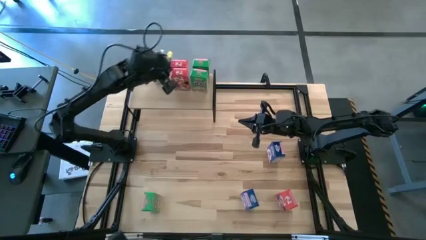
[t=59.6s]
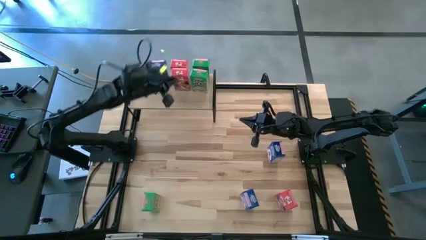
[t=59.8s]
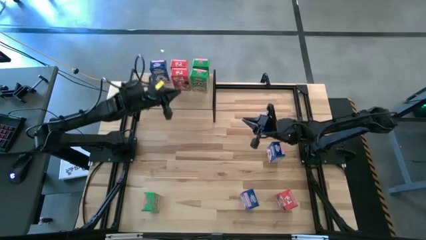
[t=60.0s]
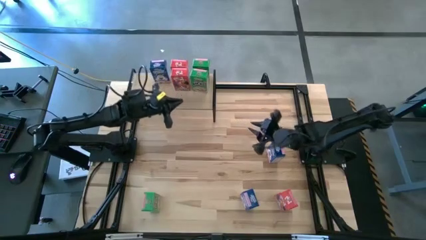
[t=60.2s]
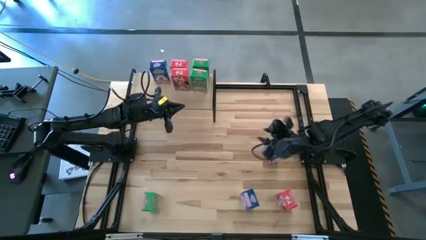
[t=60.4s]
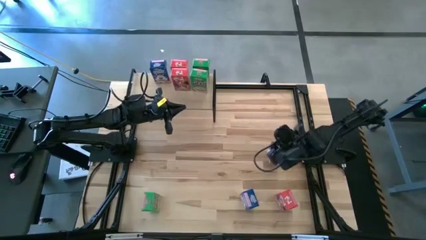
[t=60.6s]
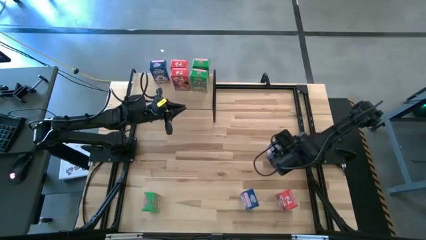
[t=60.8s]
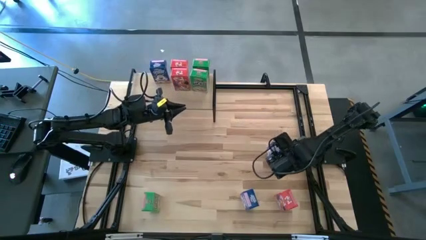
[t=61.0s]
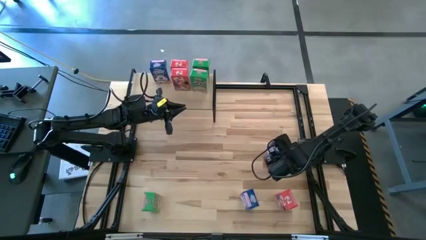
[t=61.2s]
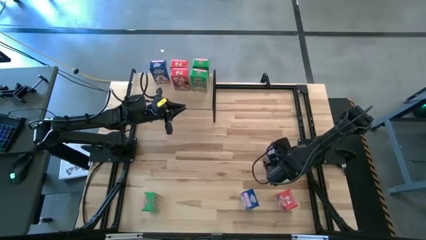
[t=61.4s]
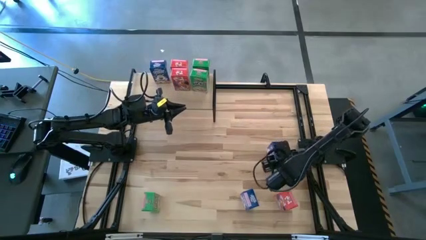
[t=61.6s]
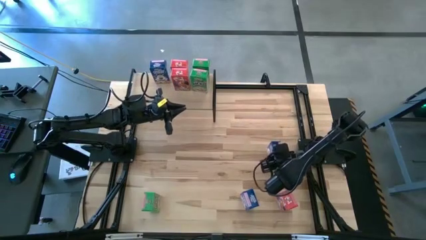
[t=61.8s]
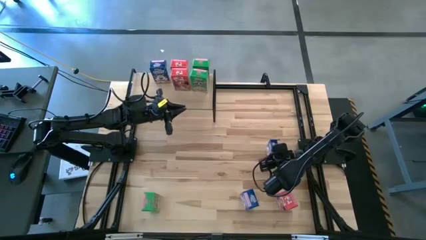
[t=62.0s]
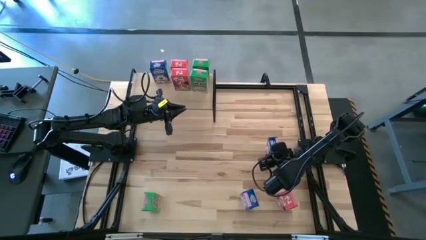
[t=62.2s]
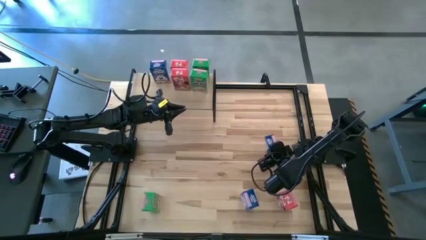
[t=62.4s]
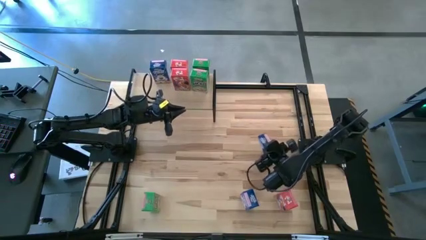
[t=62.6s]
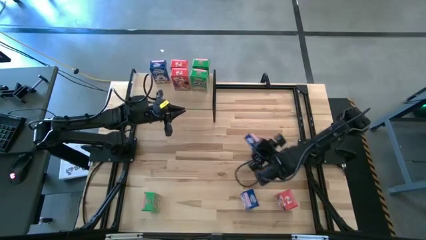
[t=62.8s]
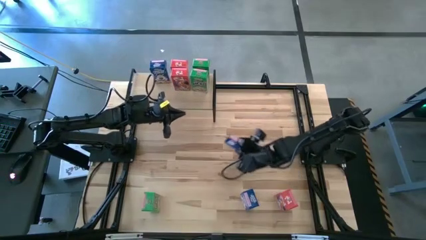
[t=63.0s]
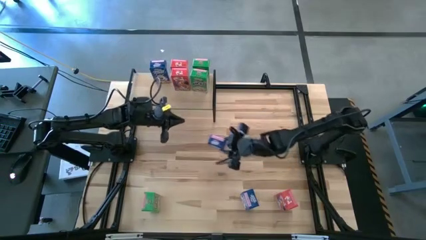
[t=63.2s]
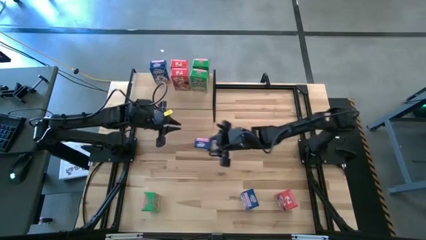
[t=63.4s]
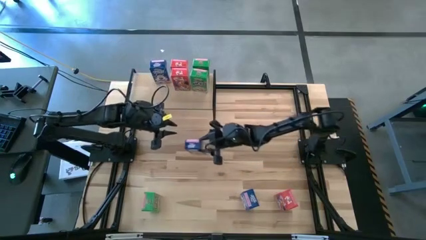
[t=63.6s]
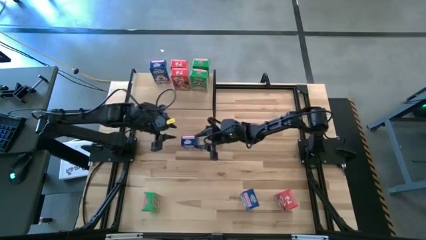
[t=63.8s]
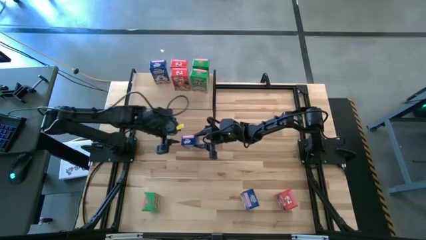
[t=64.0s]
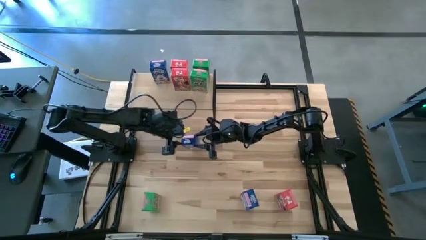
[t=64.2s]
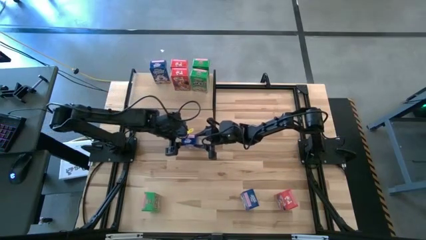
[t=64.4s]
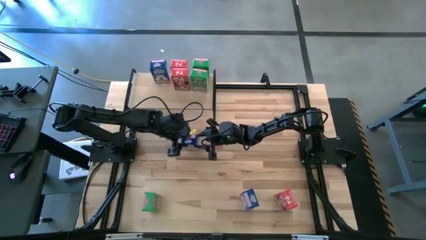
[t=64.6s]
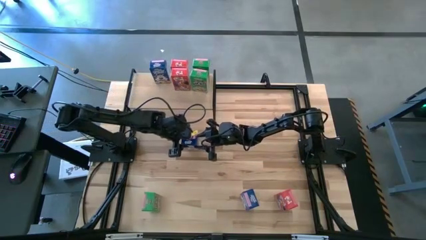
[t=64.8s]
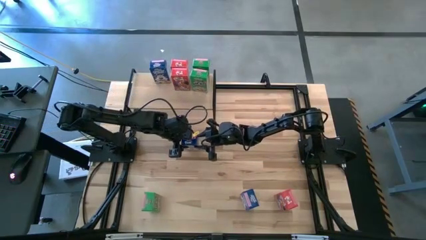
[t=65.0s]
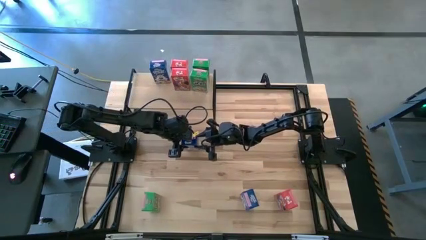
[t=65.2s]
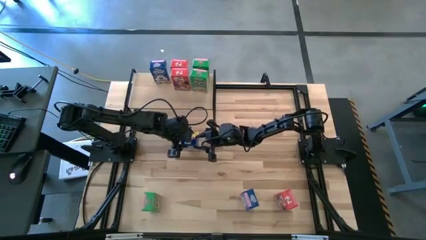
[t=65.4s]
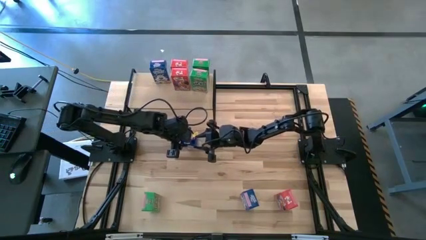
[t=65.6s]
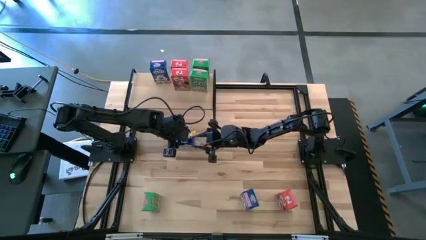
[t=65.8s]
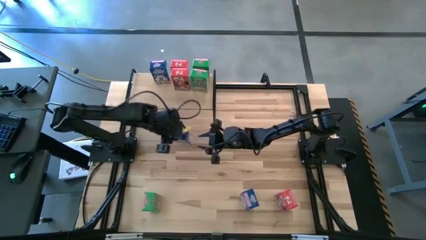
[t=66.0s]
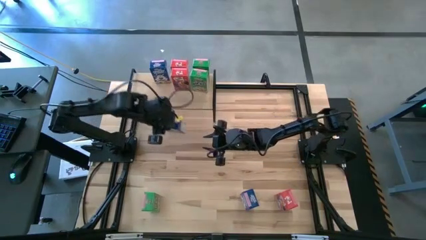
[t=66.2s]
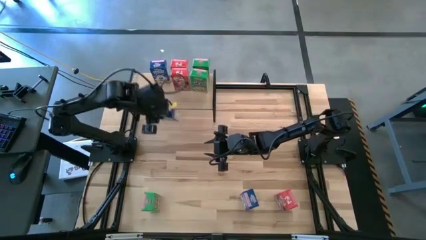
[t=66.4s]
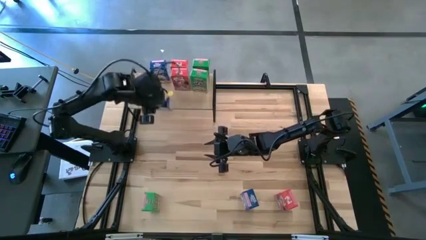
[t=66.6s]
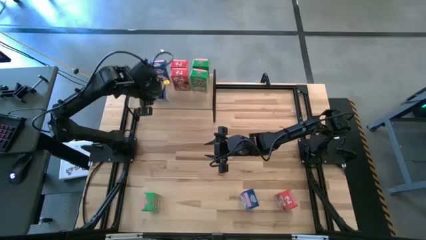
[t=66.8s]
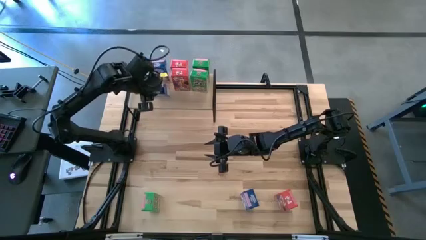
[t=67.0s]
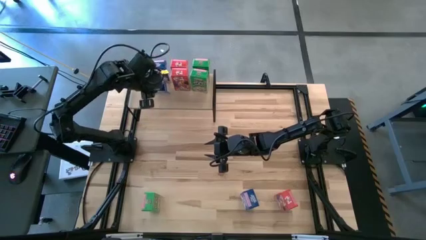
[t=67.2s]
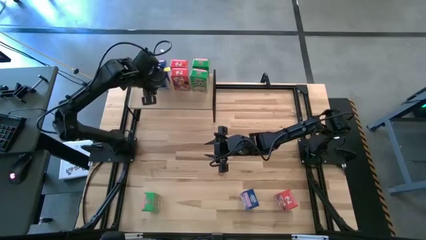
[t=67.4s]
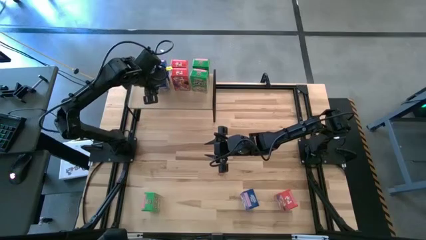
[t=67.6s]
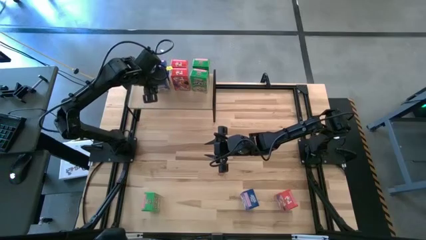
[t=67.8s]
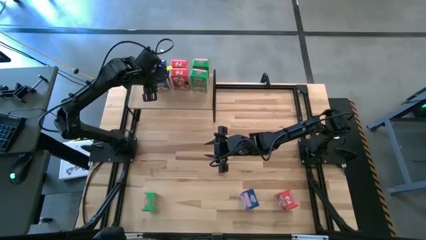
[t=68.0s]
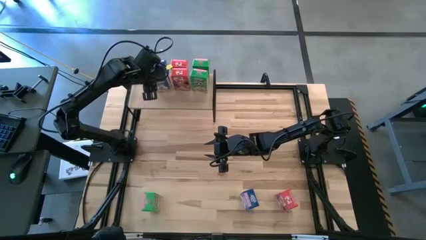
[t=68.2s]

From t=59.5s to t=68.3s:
Task: Stack cereal on shelf
Put the top blue cereal box on the shelf aligned with the other blue cereal box

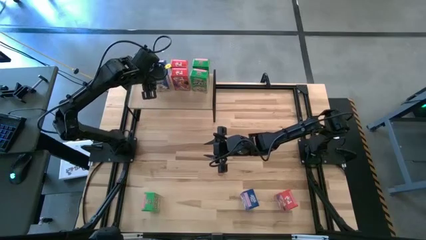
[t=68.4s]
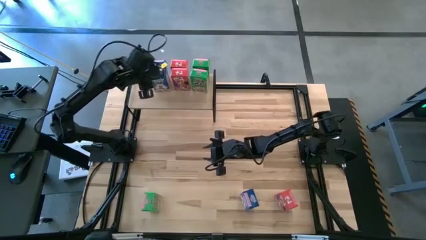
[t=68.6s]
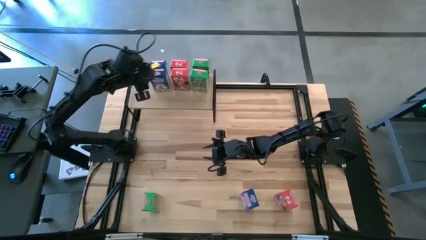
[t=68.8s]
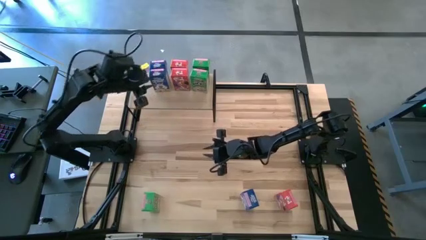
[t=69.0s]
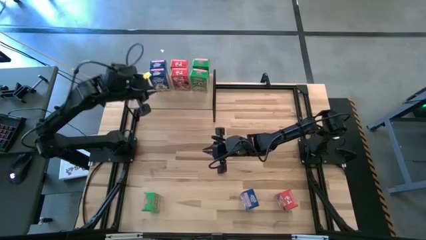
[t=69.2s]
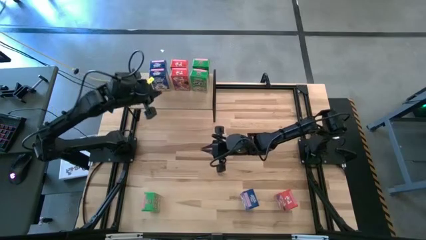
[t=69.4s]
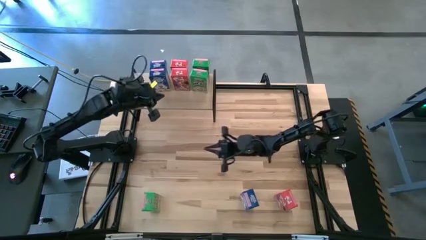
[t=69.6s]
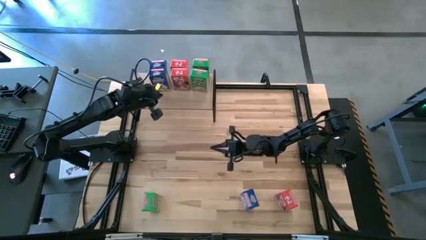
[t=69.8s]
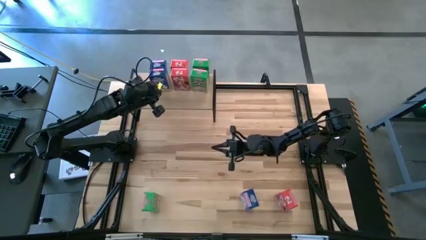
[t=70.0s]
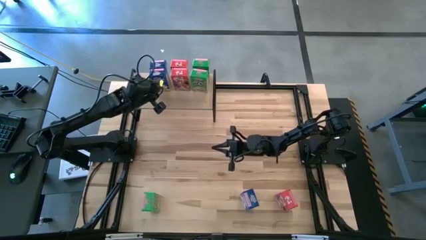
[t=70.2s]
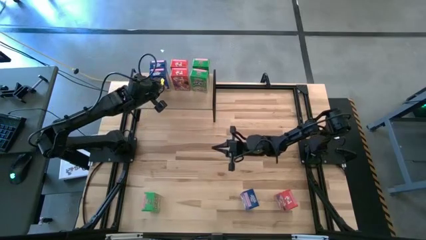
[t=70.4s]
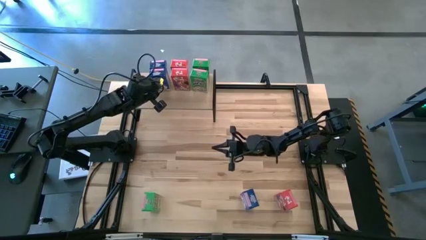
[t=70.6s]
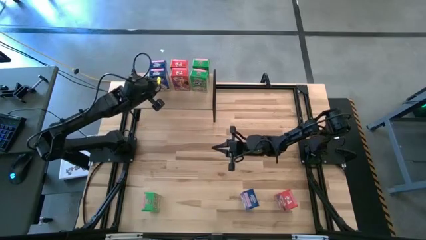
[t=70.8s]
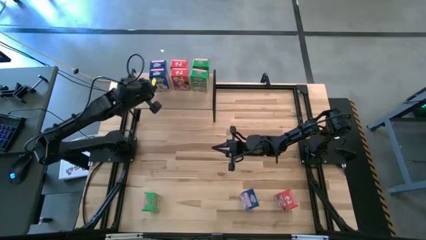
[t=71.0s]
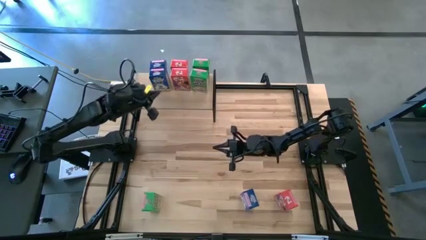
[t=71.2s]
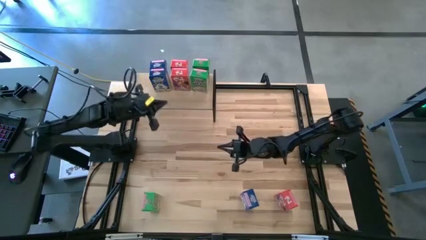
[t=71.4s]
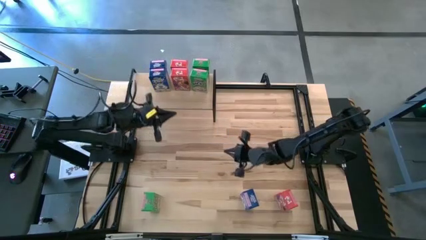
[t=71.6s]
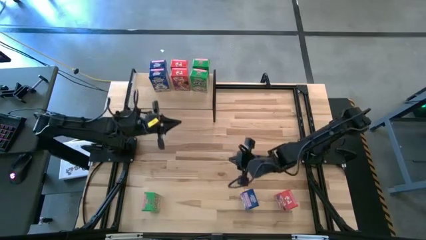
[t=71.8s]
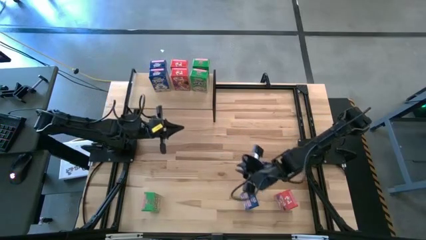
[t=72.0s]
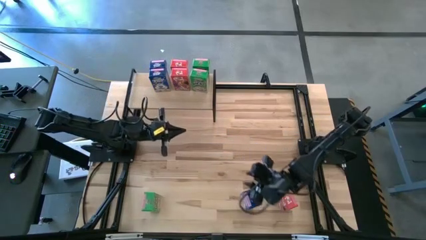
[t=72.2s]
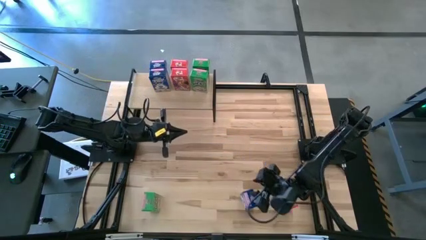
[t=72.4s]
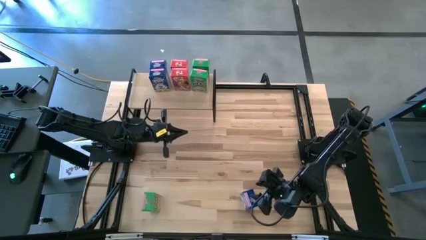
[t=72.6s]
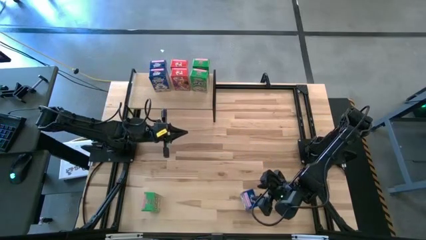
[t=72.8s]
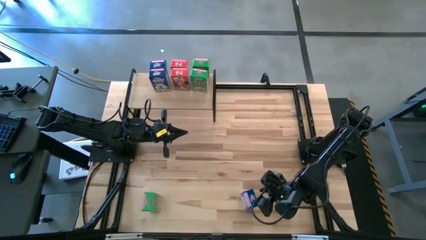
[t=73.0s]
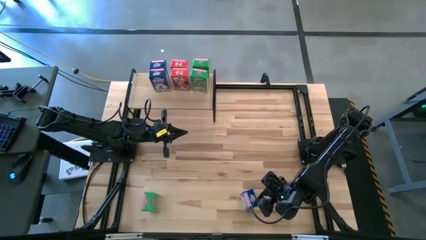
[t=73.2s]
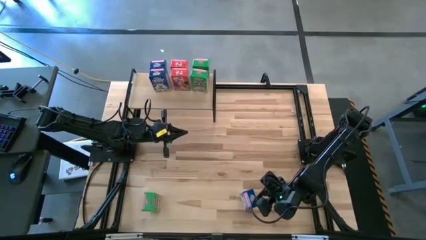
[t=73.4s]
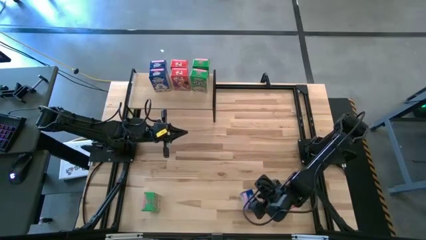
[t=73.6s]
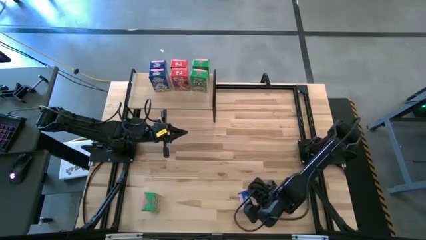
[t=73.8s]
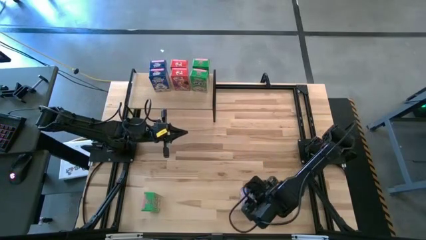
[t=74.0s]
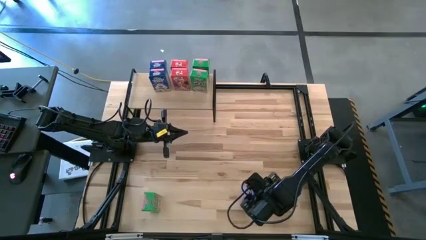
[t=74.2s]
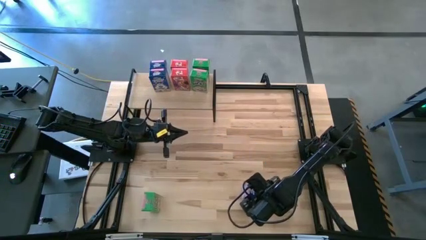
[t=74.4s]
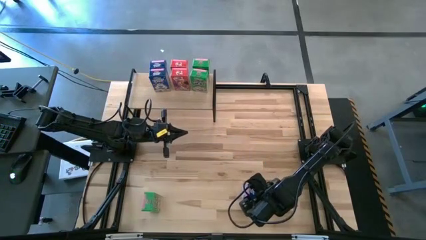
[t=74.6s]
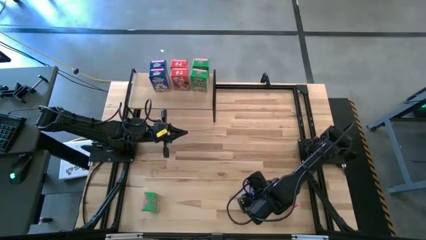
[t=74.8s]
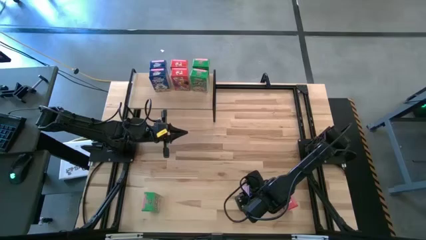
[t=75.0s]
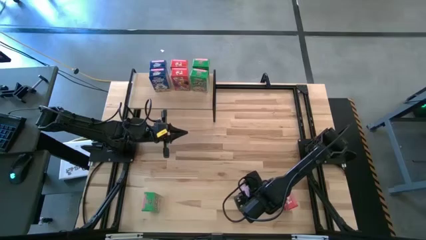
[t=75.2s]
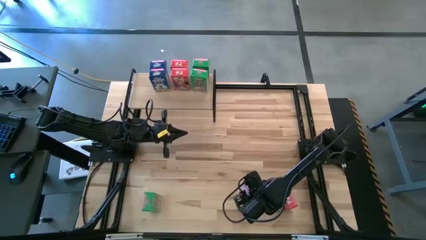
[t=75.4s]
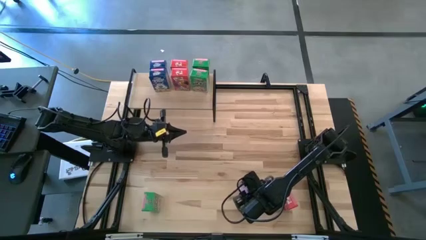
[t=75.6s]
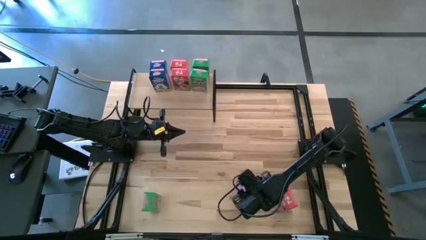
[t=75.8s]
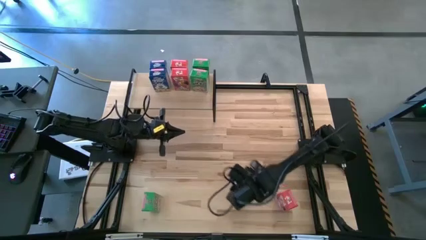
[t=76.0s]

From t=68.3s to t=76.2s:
Put the blue cereal box on the shelf aligned with the other blue cereal boxes
